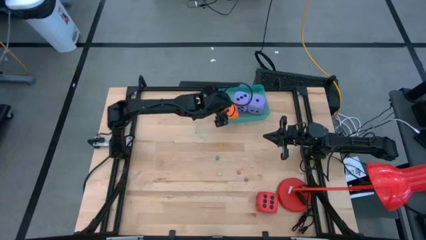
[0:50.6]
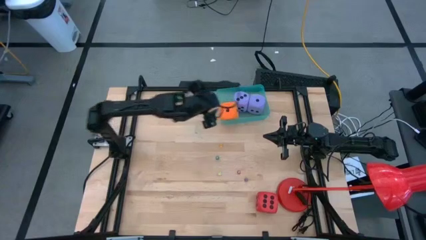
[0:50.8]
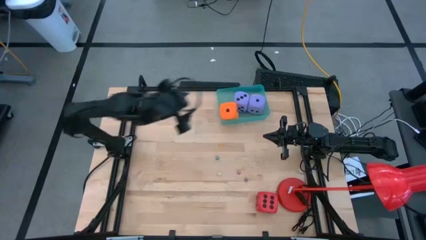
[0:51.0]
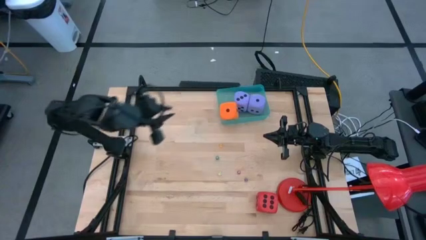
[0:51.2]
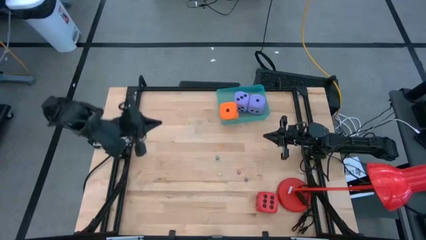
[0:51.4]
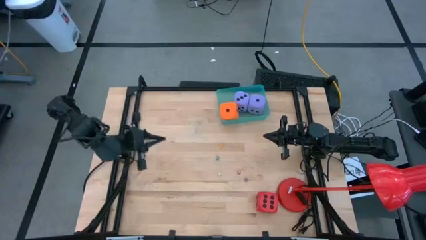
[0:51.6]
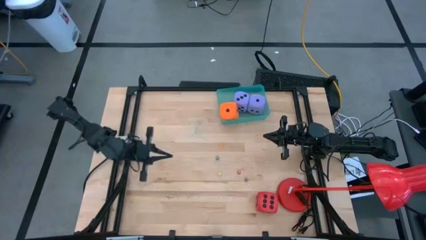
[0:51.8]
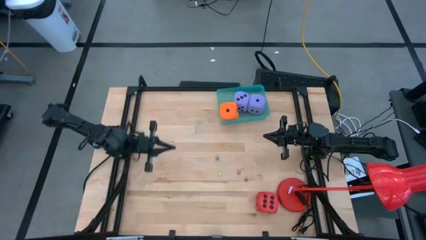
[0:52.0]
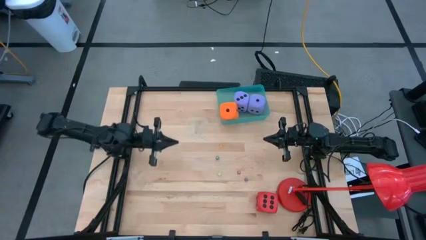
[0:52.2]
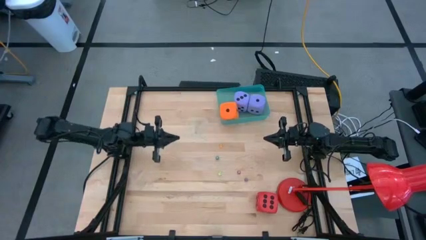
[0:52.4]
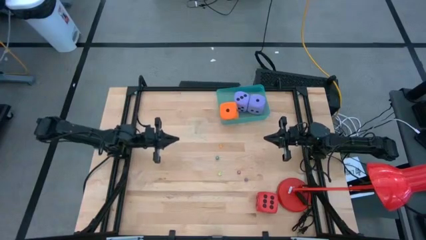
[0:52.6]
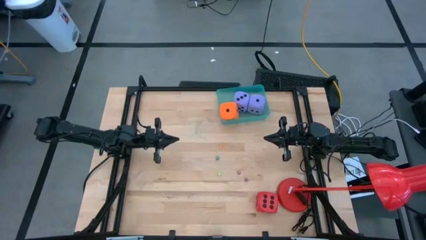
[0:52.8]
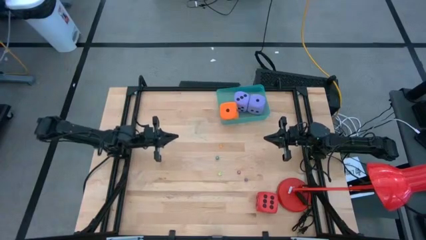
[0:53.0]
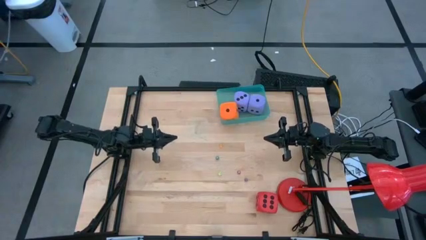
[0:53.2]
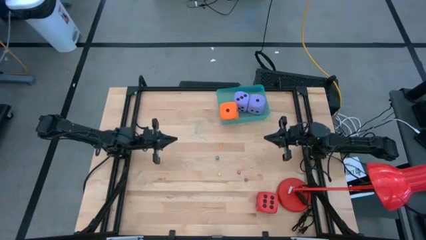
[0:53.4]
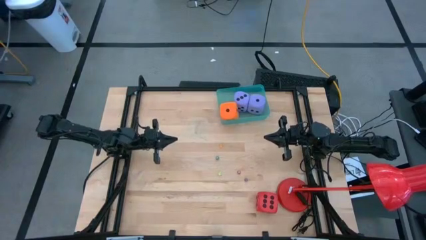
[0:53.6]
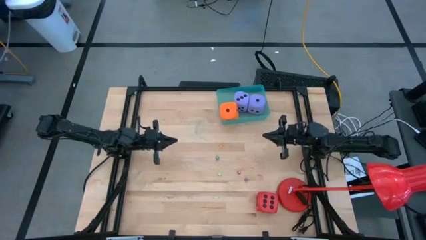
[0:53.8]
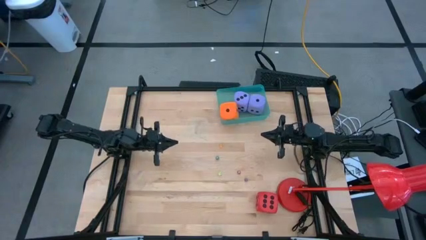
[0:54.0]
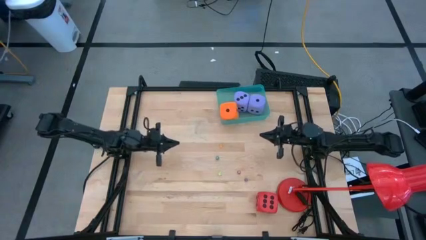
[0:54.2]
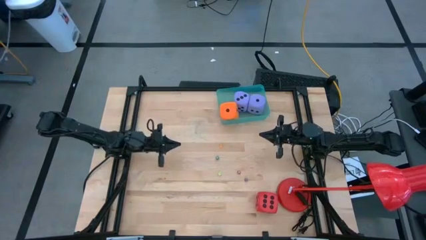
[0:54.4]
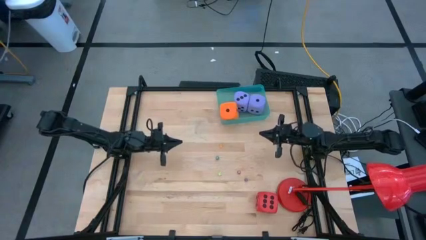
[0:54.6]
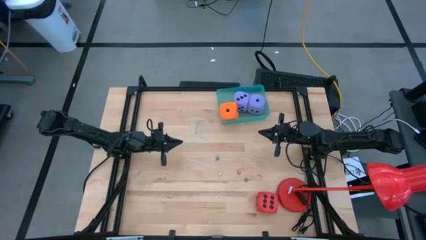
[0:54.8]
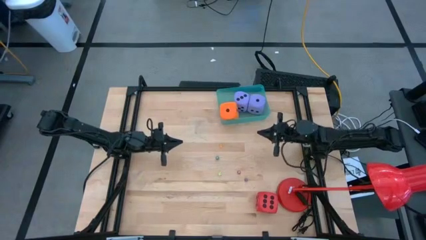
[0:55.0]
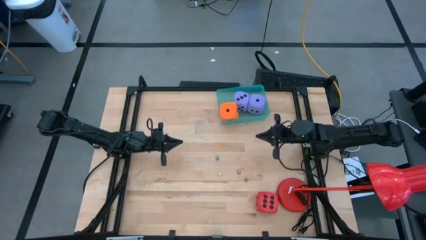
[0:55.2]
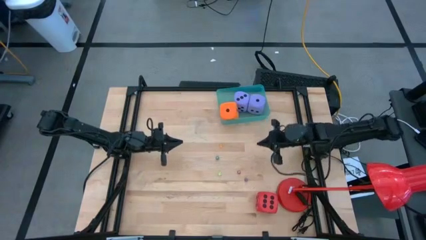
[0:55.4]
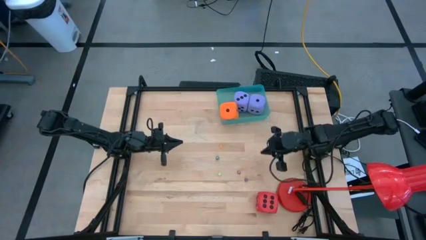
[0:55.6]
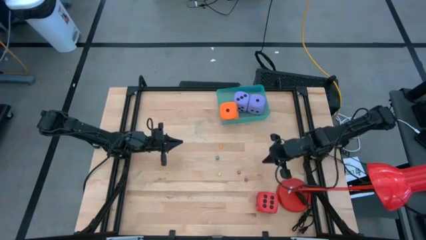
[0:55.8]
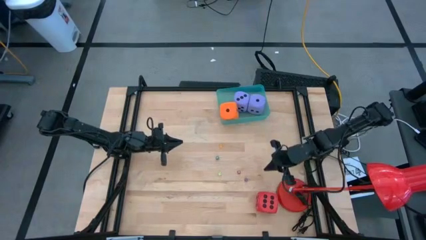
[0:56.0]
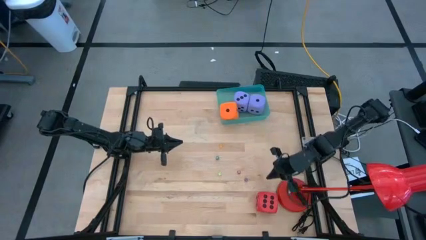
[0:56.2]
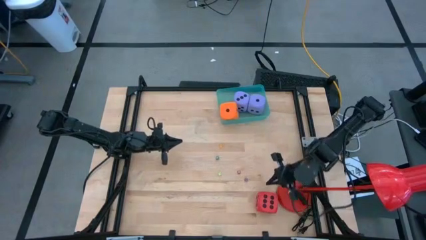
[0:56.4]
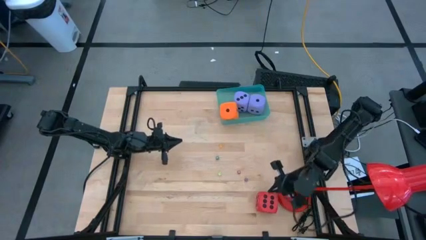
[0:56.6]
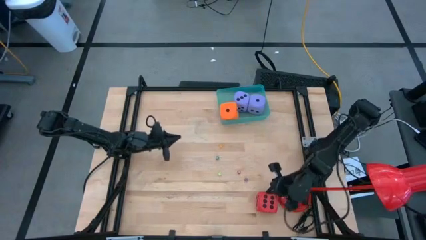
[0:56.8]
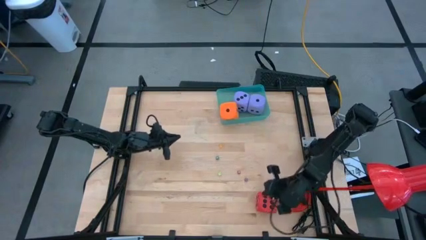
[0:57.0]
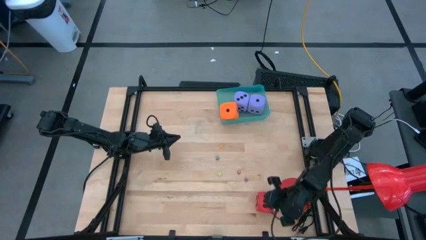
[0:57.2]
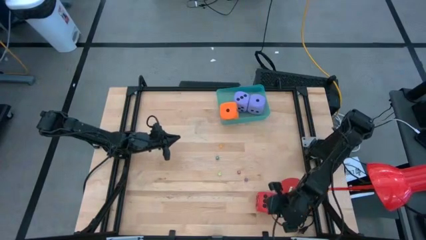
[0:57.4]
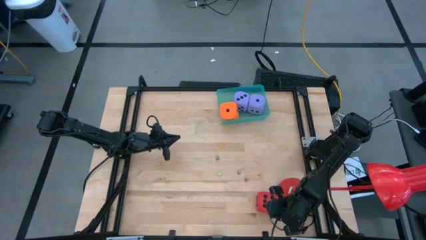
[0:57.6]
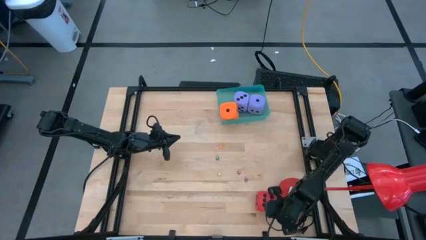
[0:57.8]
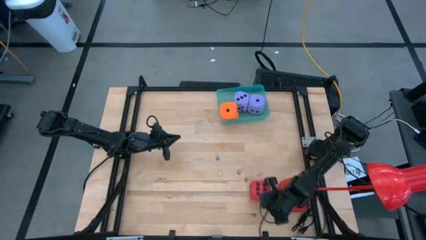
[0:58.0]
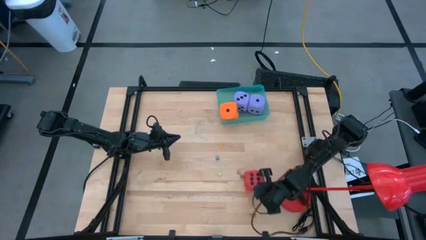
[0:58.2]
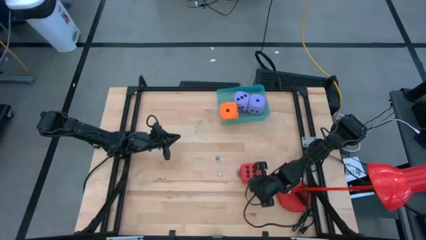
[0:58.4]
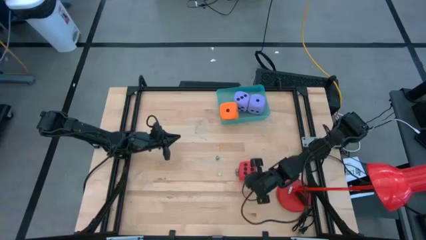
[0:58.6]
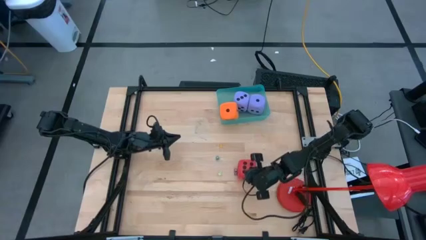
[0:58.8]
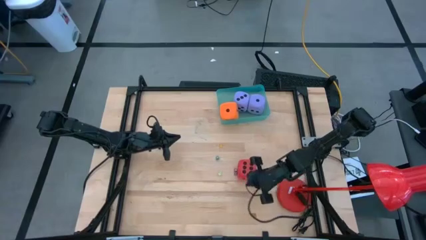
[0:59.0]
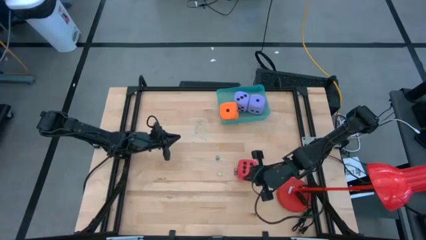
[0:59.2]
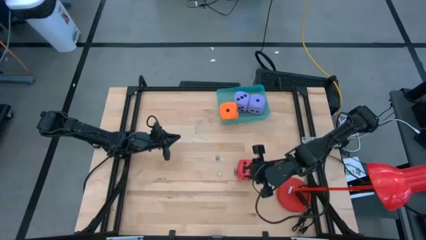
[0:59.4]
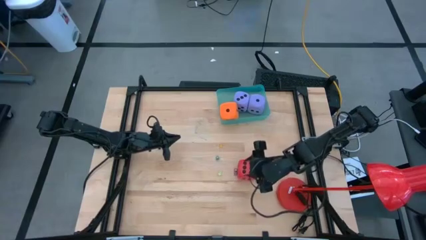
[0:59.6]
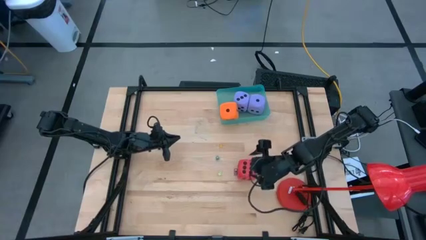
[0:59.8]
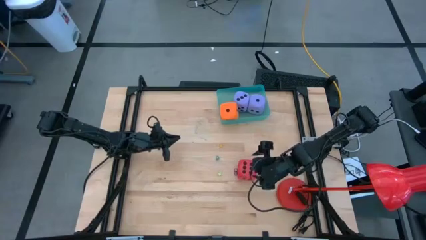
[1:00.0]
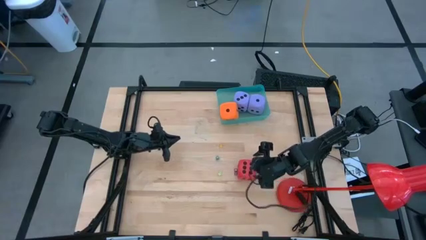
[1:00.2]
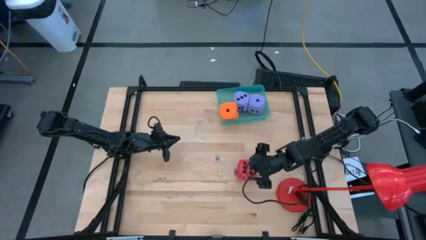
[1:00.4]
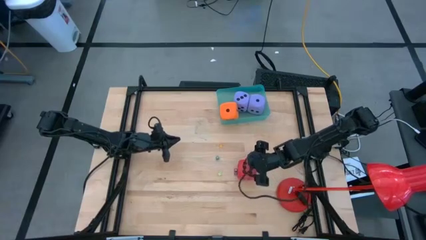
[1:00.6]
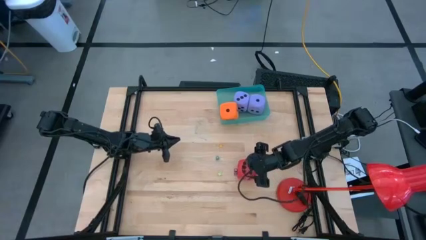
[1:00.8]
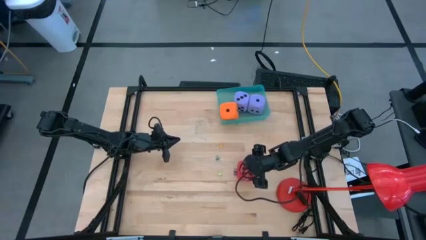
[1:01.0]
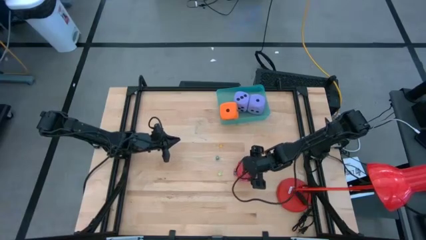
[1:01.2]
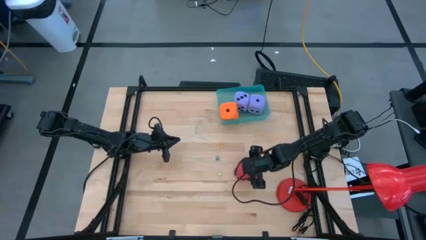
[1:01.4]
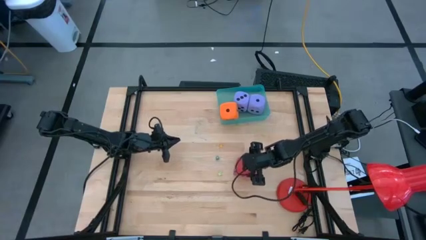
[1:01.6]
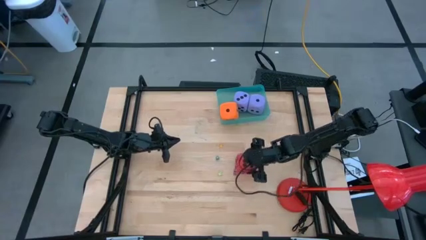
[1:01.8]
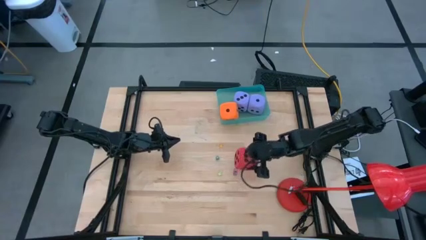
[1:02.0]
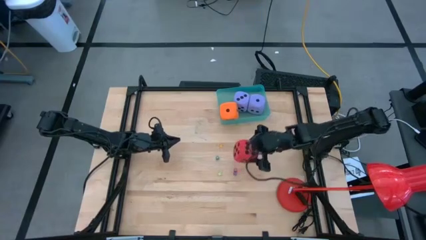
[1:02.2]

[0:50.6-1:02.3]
Task: Pick & Place Dice
Put the large red dice into the blue transparent bin

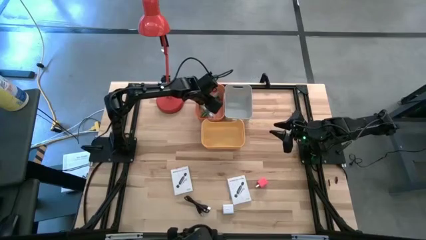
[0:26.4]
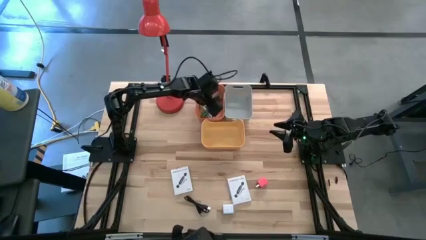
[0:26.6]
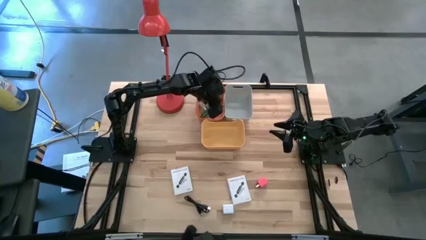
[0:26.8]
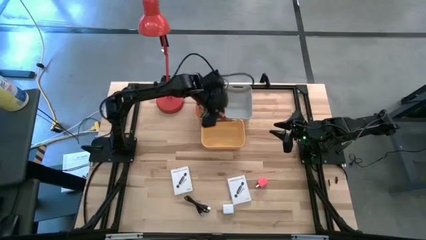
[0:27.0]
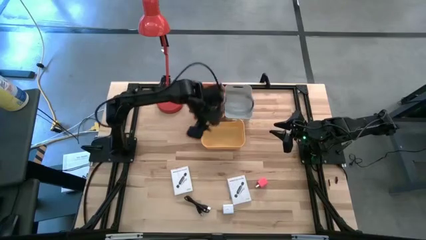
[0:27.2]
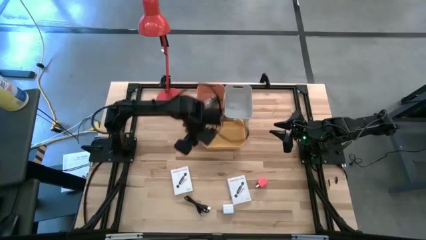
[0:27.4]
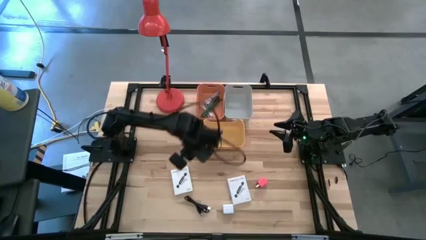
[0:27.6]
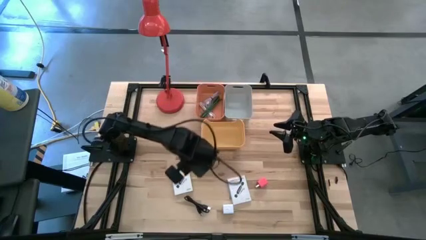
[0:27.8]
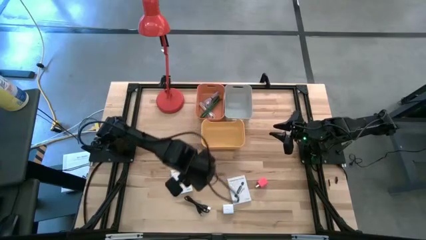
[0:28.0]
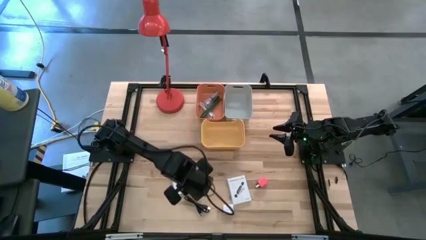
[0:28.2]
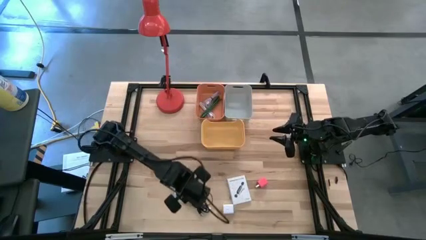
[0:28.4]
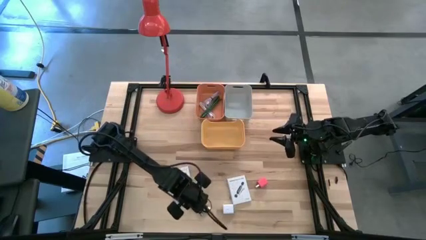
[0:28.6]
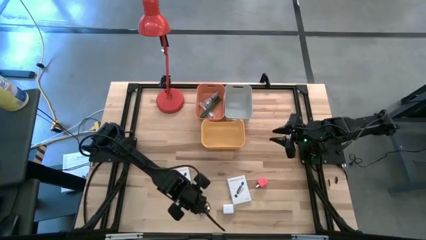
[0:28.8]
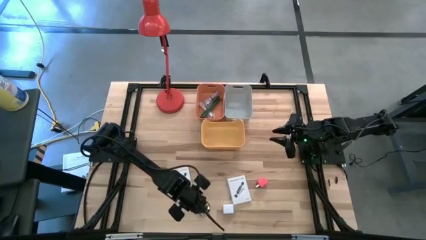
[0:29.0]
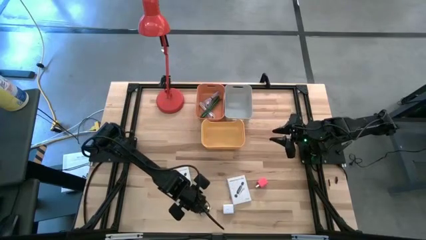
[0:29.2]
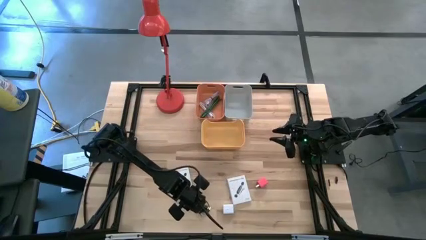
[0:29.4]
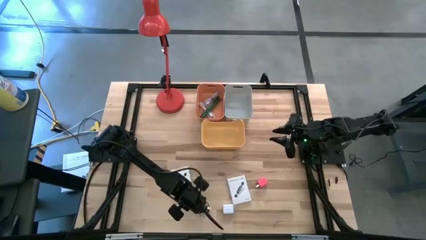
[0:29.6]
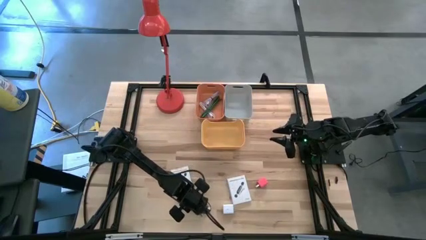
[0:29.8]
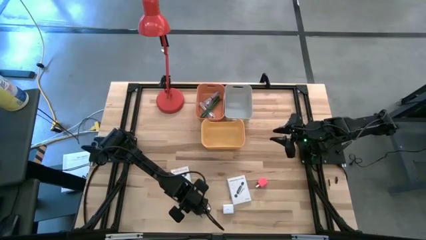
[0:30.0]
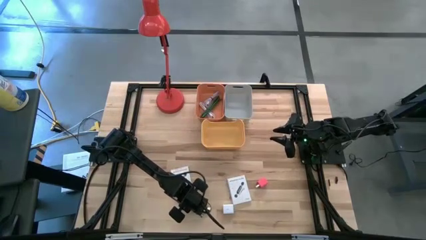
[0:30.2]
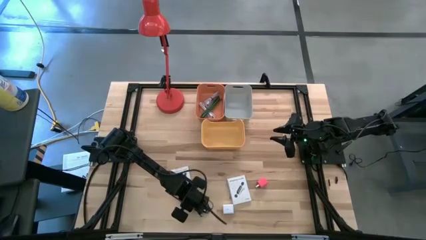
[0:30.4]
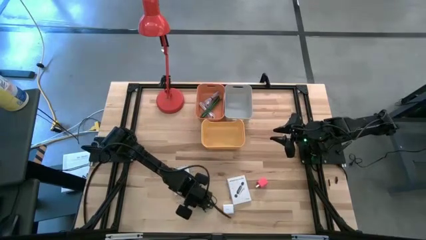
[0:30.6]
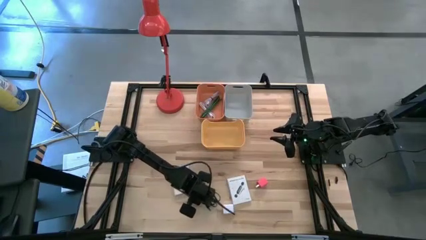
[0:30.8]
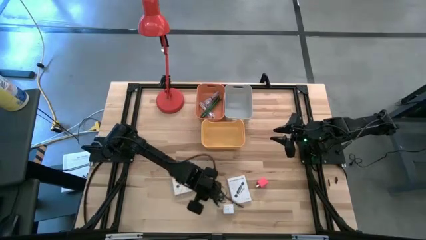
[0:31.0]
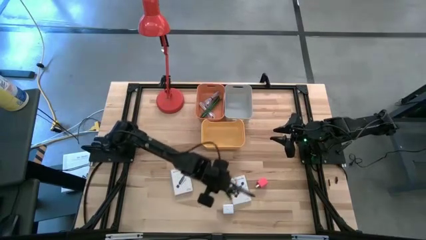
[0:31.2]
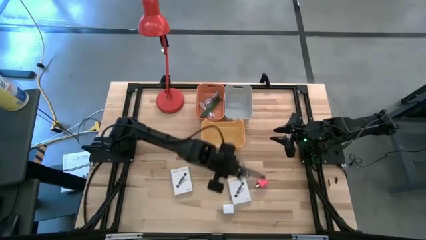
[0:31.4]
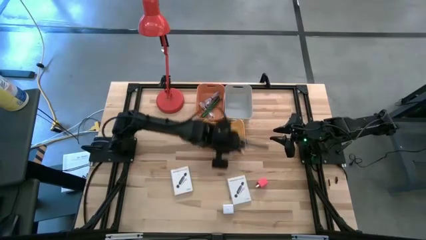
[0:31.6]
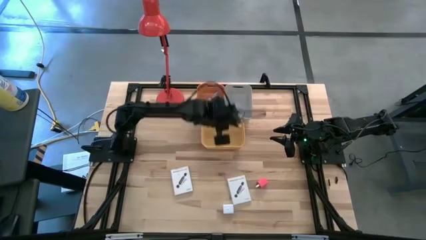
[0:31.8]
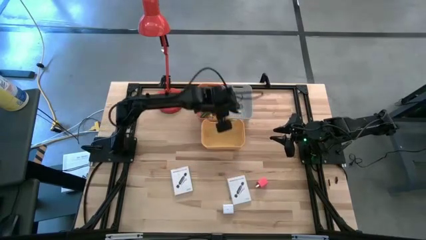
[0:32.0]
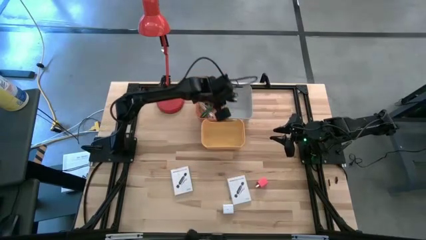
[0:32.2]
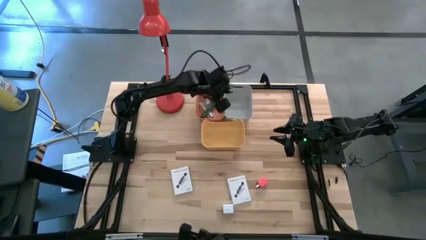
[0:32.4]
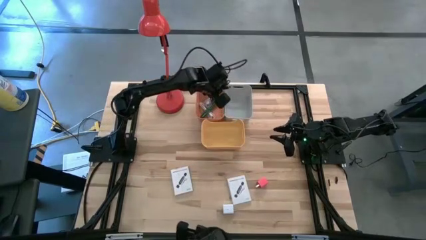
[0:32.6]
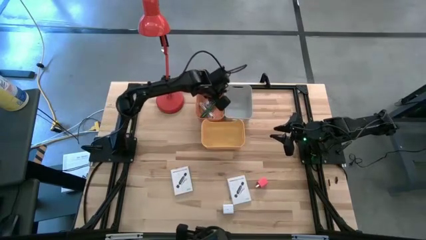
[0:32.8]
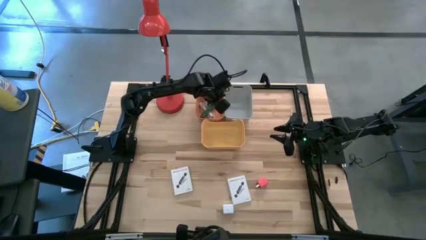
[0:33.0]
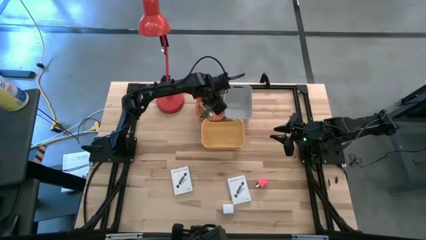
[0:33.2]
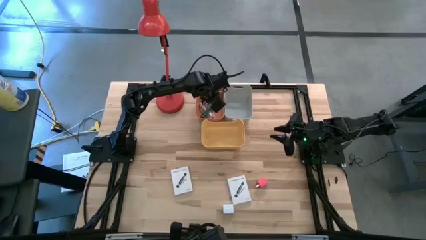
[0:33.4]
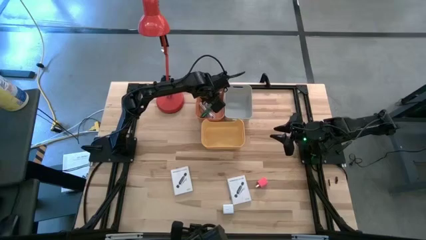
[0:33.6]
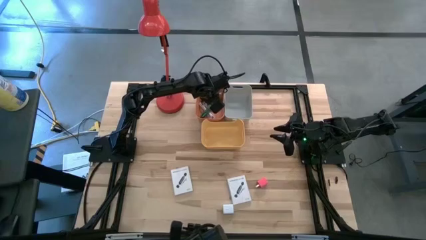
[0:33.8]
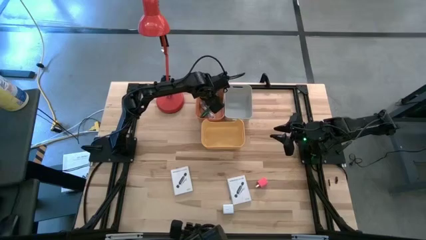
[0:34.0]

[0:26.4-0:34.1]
Task: Pick and place items into bin
Put the black charger cable into the orange bin
